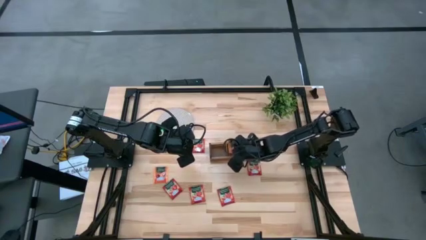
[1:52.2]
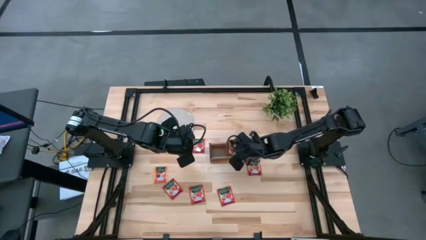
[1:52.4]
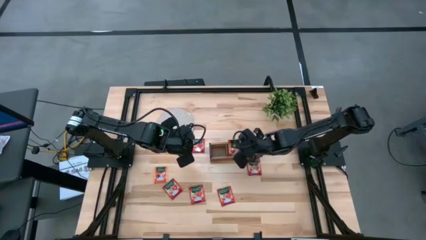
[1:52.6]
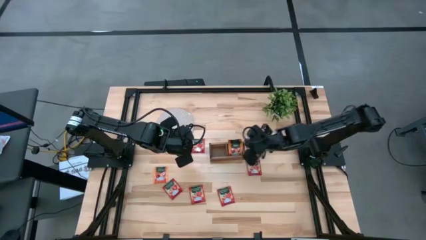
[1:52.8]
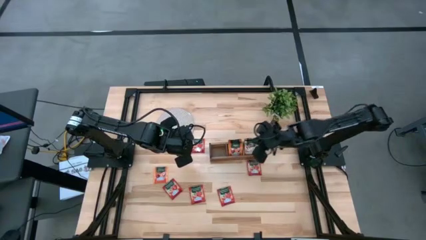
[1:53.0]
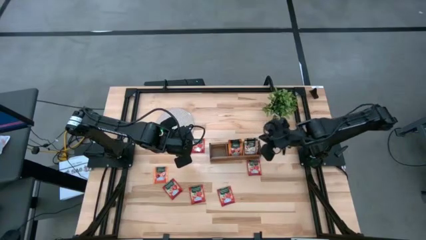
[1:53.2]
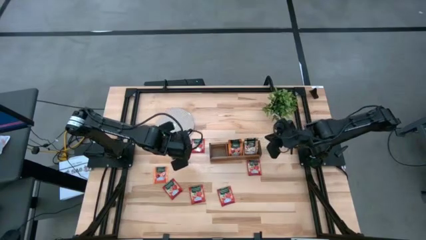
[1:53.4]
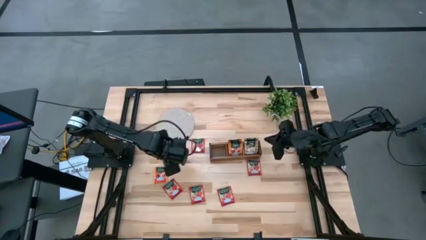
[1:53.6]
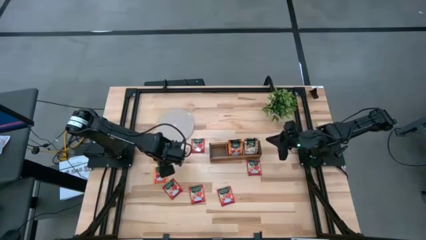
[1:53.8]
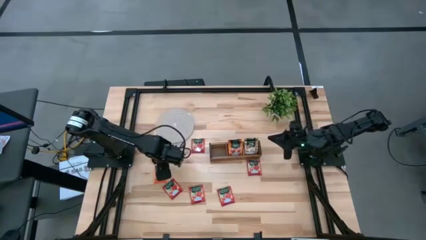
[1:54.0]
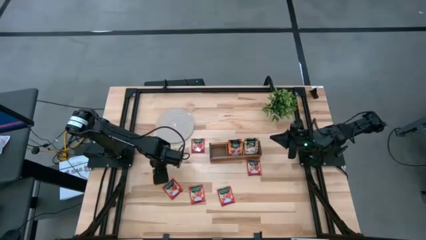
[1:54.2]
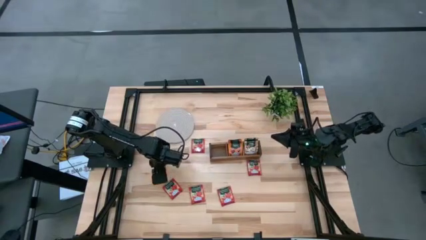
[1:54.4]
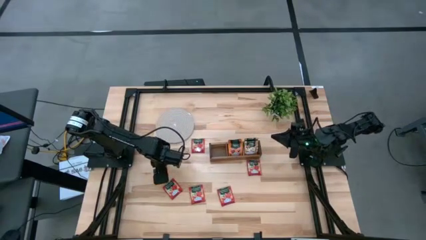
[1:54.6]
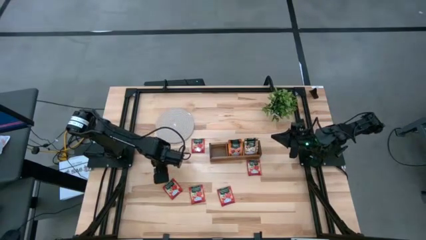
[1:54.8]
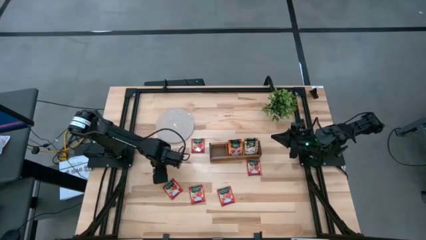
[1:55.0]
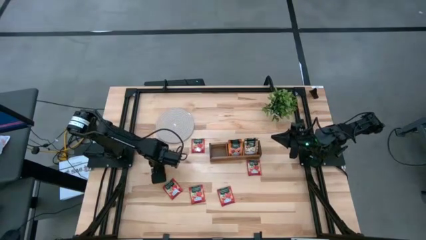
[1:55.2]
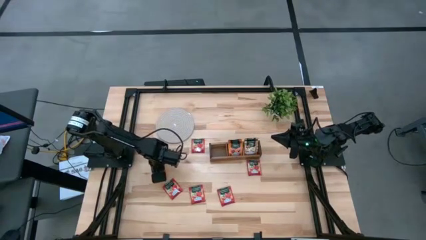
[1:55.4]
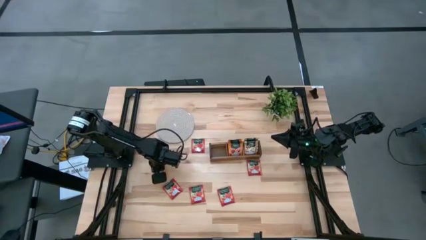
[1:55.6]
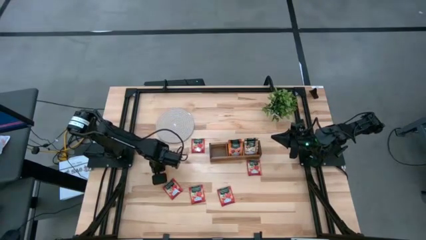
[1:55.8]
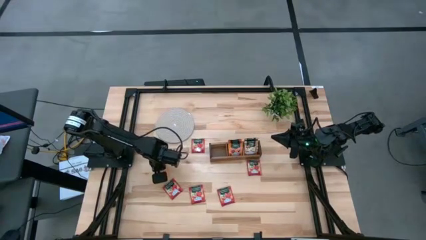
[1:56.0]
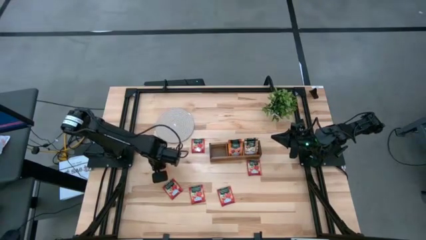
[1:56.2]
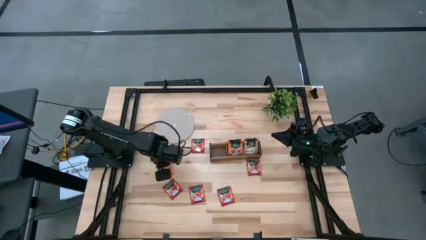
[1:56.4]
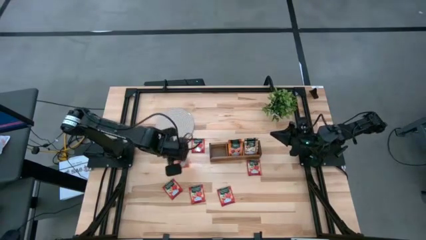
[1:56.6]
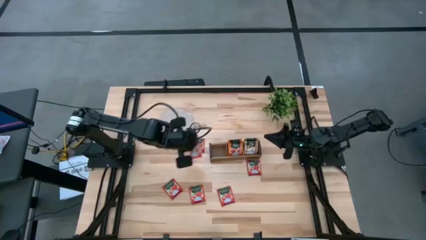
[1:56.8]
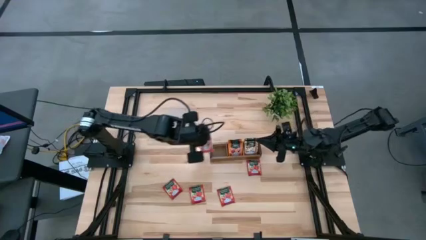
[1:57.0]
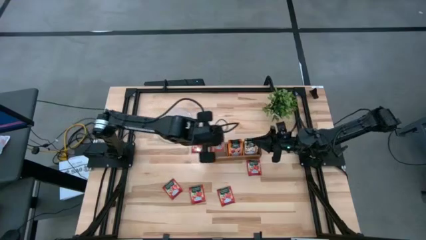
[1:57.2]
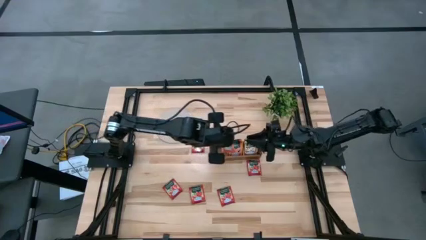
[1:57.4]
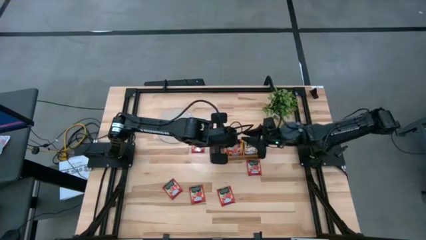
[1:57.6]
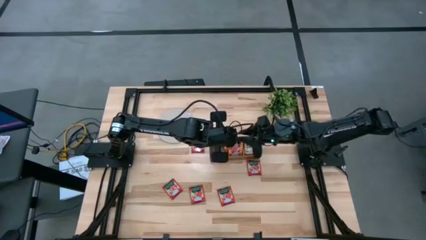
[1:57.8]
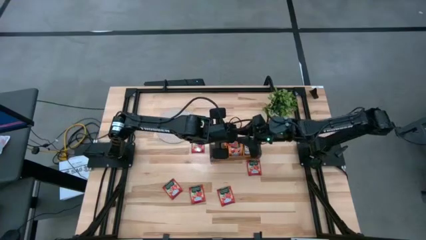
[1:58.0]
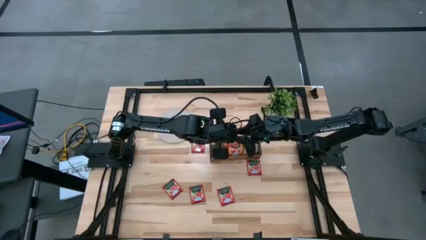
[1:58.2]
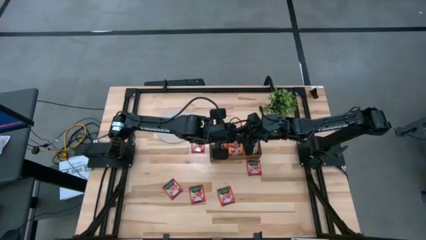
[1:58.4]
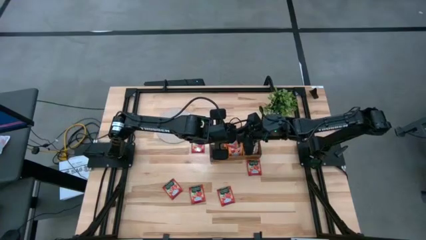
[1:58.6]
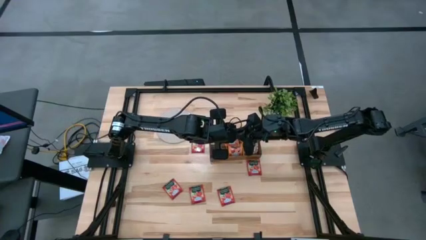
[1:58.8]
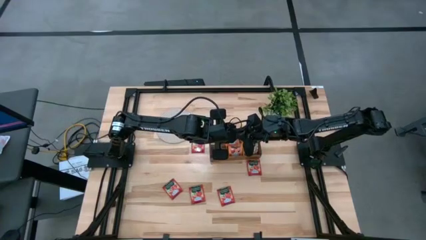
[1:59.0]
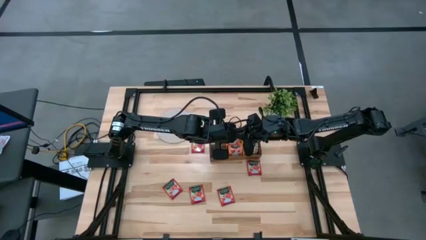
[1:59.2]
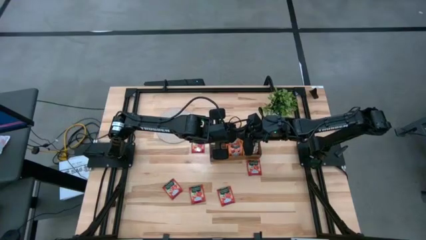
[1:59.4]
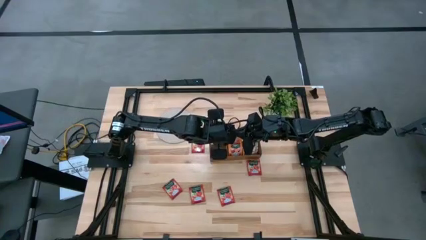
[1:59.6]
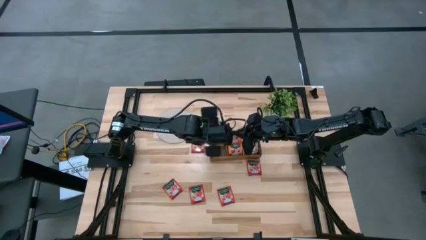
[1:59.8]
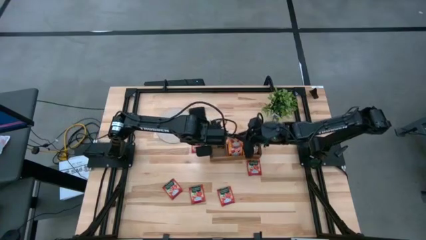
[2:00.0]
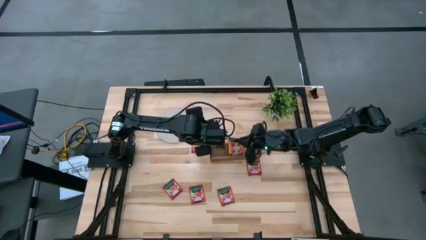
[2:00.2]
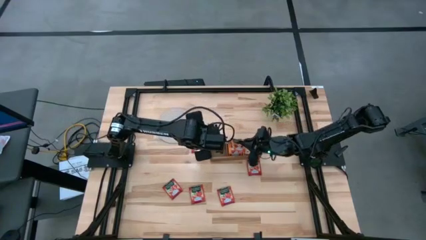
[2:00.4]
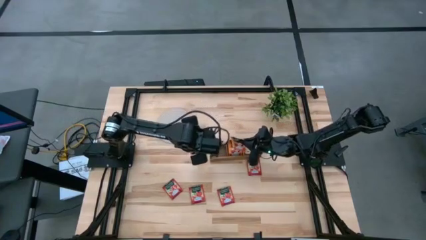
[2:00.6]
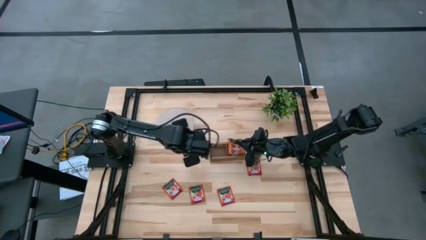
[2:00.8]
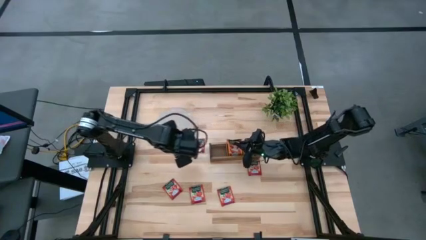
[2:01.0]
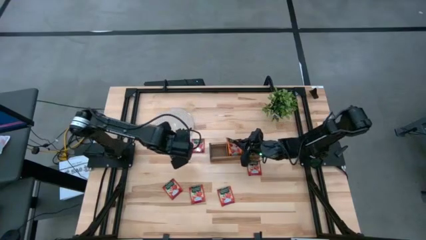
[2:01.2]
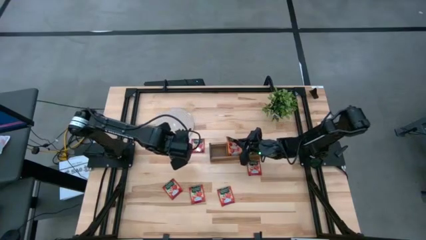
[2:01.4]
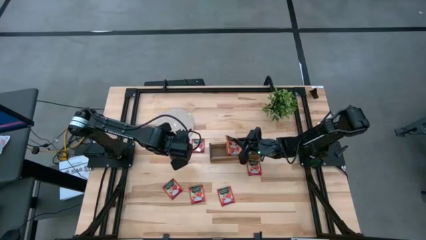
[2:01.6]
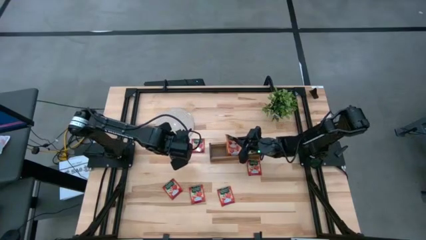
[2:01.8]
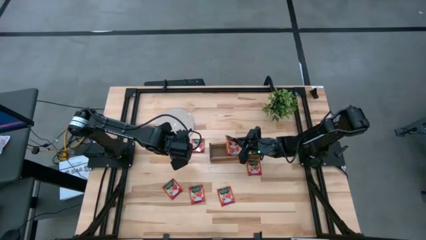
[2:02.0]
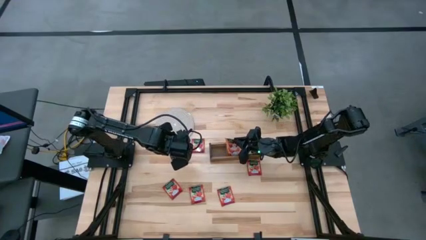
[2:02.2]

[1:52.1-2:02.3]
Task: Pick & Place Tea
Put the orange tea bag into the middle section of the wooden organizer

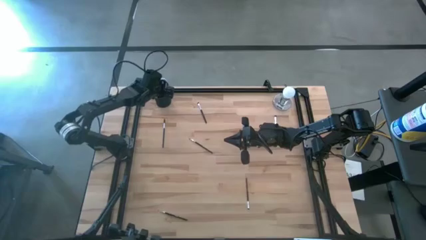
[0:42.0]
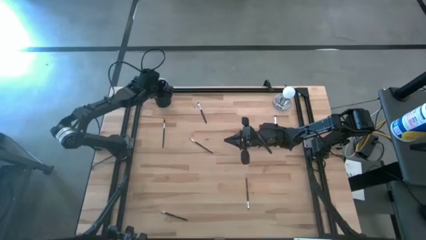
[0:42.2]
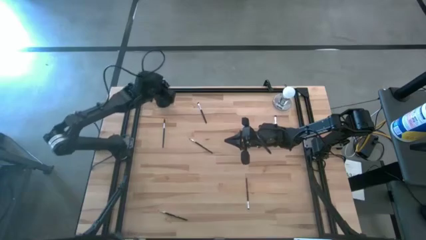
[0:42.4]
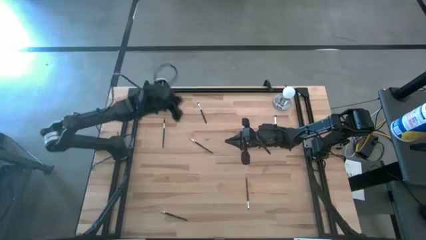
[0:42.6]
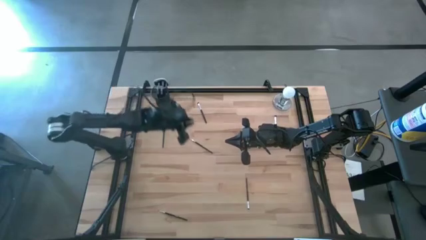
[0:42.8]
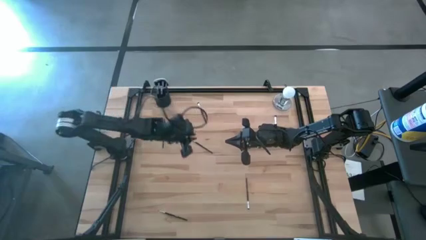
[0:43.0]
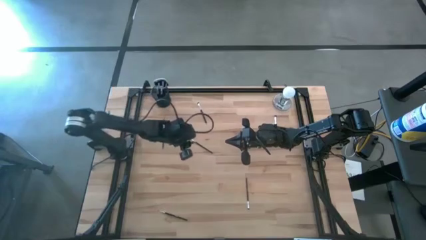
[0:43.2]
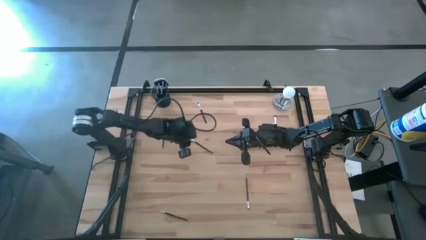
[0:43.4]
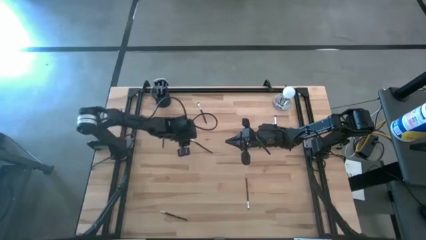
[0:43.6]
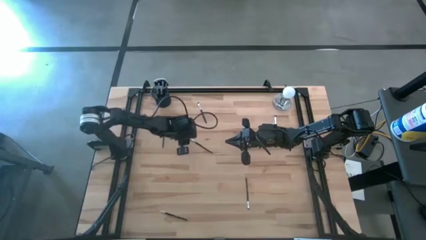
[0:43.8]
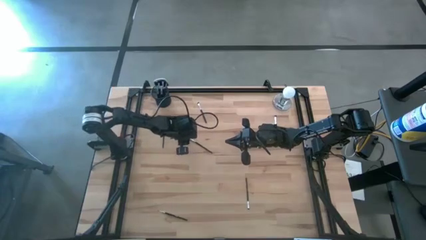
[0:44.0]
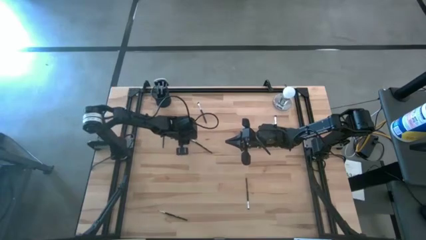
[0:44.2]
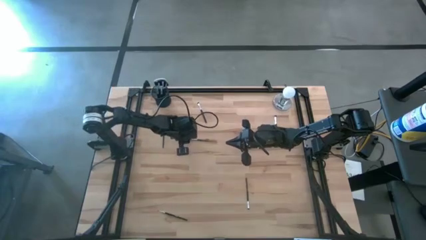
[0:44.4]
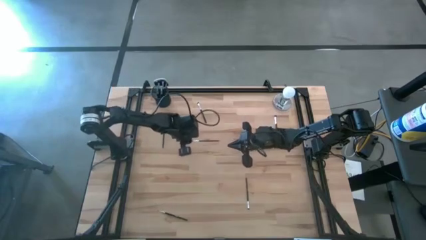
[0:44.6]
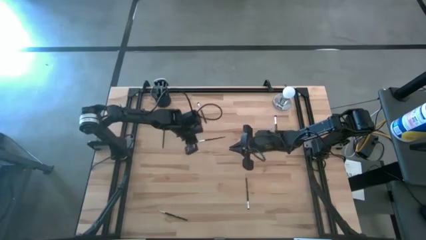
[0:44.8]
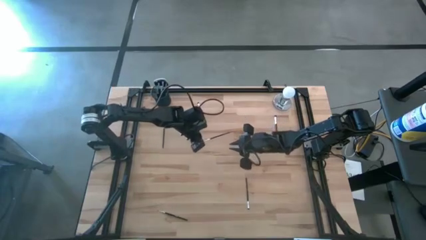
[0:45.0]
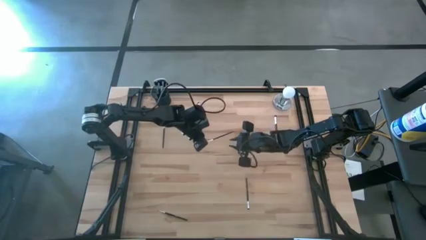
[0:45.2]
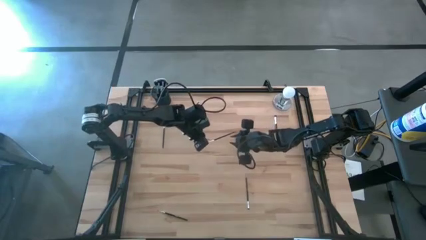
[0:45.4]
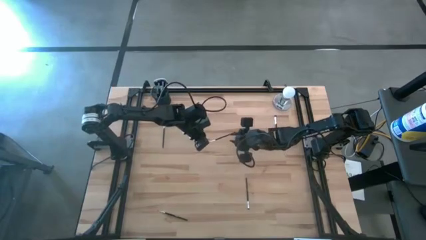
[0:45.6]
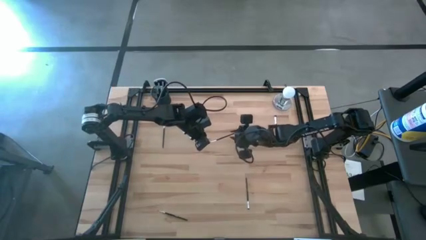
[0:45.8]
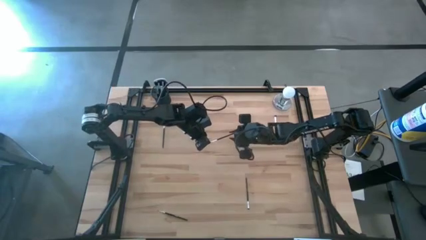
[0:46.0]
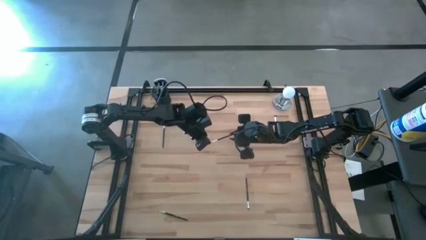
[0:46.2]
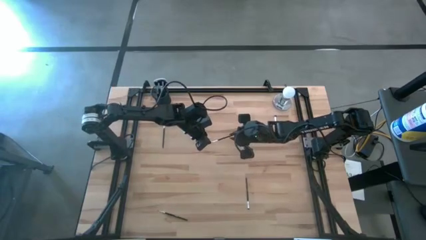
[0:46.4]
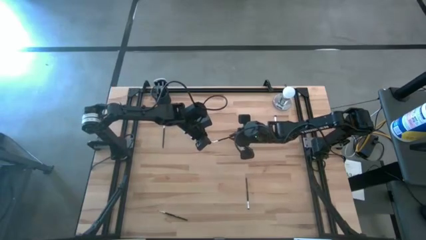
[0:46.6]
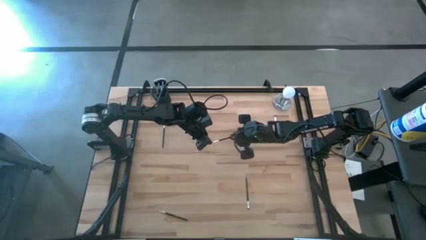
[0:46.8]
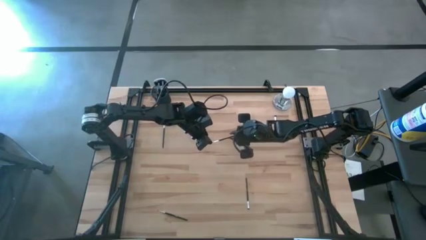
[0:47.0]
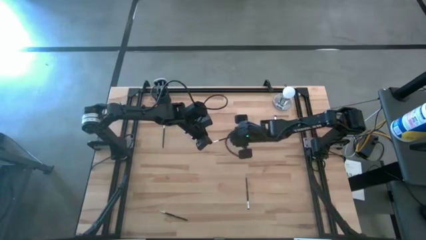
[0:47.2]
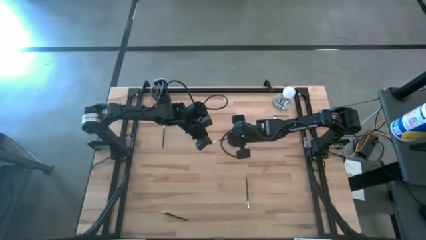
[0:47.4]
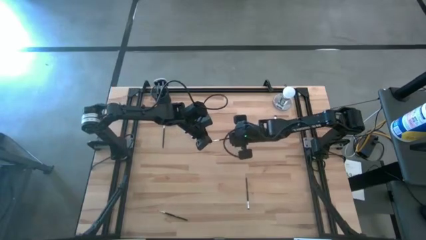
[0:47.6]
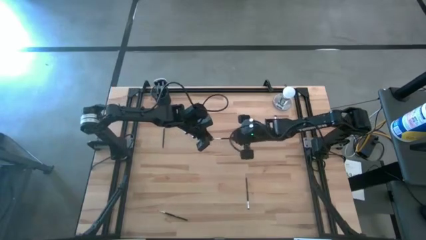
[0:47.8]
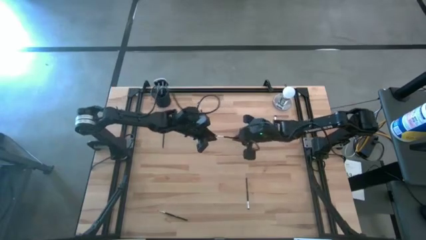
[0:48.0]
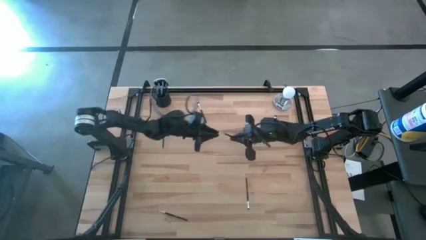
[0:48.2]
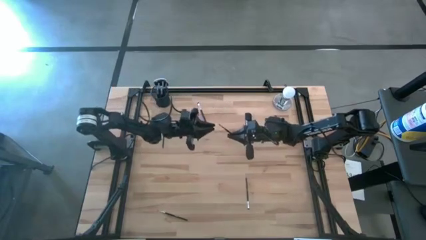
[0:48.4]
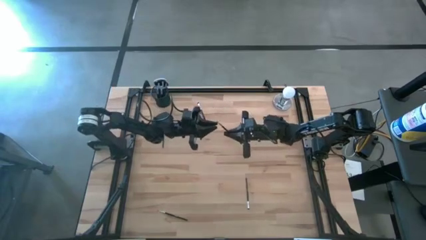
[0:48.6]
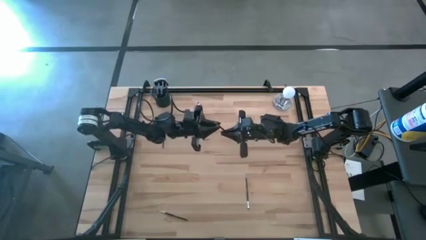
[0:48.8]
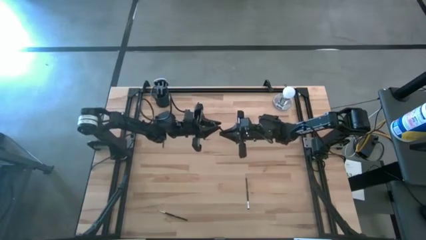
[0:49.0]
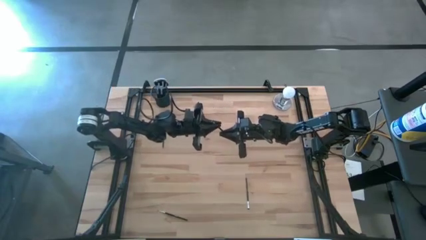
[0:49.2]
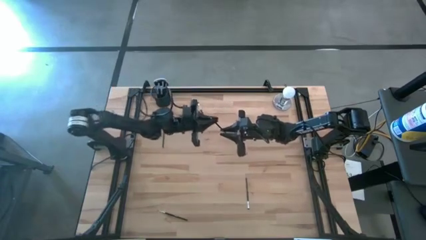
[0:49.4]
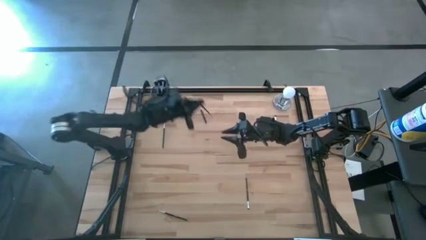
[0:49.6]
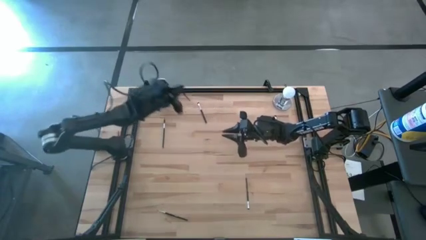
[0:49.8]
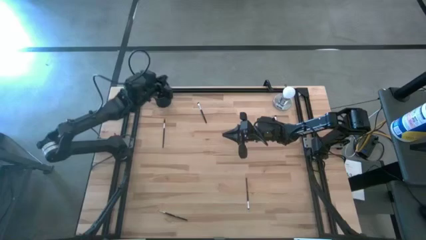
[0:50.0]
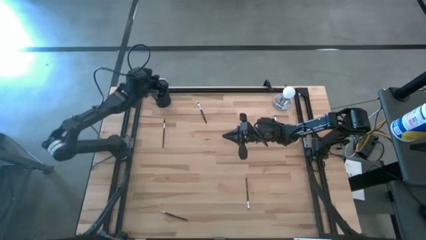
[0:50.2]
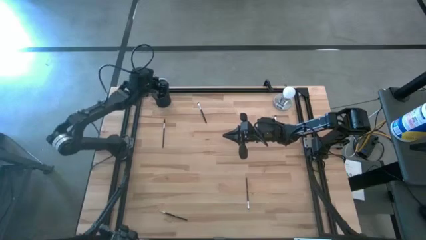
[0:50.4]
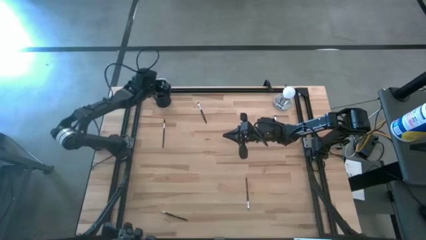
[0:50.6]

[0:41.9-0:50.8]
Task: Put items in baskets/containers
Put the foundation brush into the pen holder
